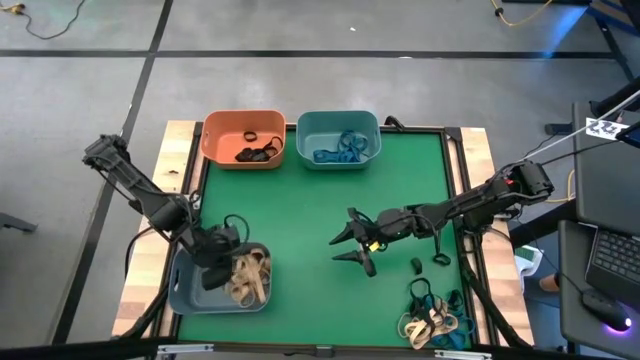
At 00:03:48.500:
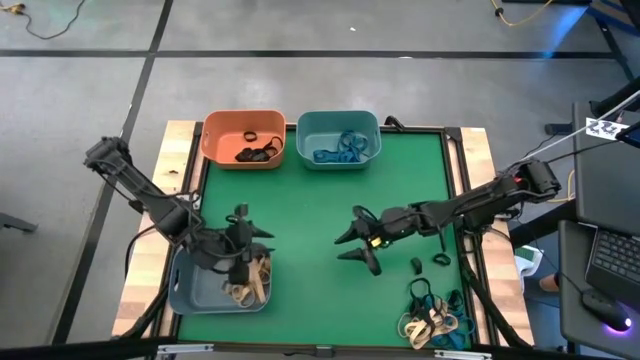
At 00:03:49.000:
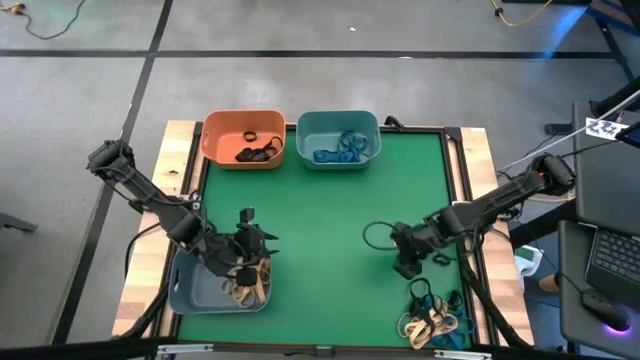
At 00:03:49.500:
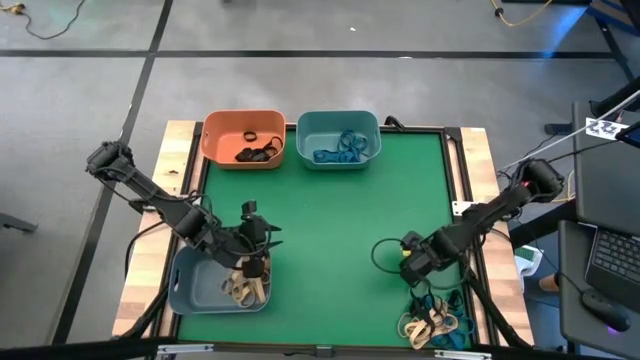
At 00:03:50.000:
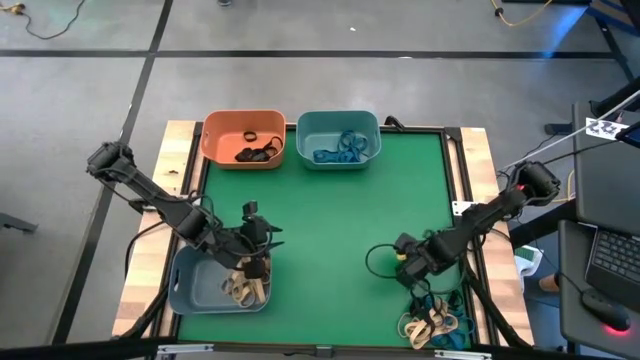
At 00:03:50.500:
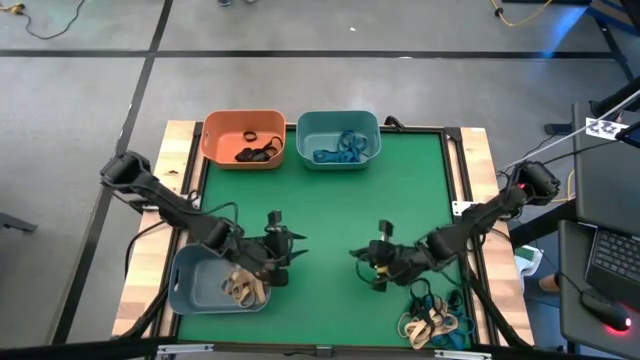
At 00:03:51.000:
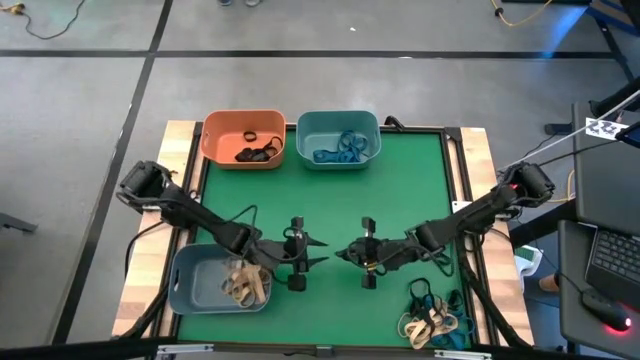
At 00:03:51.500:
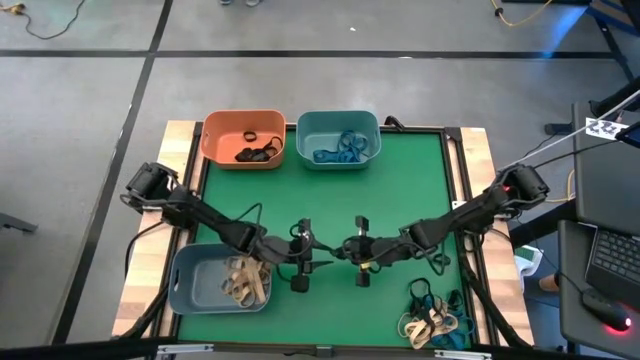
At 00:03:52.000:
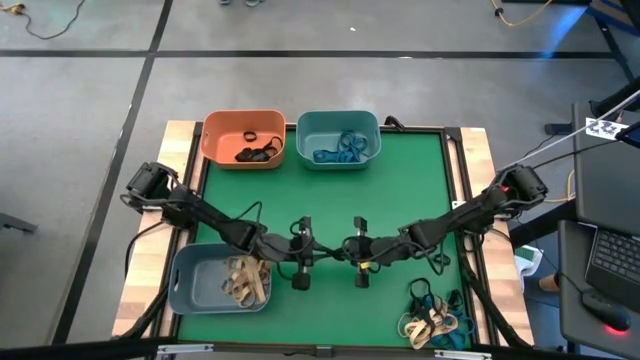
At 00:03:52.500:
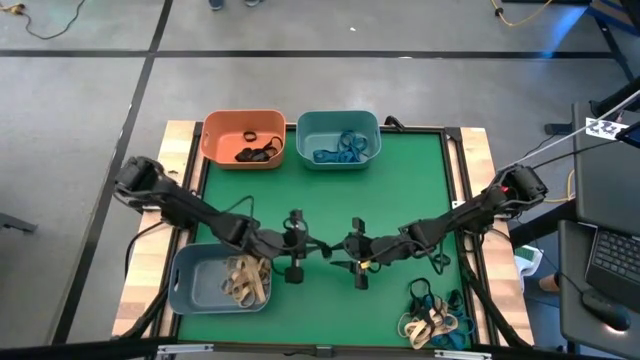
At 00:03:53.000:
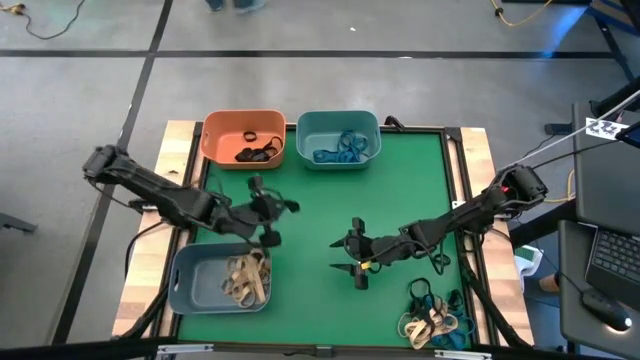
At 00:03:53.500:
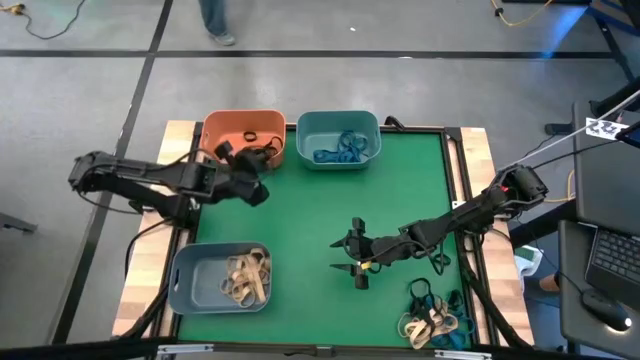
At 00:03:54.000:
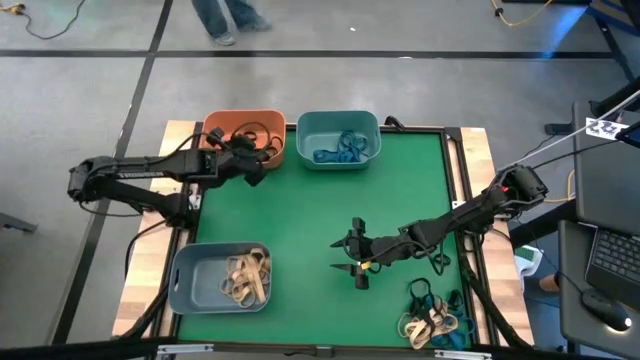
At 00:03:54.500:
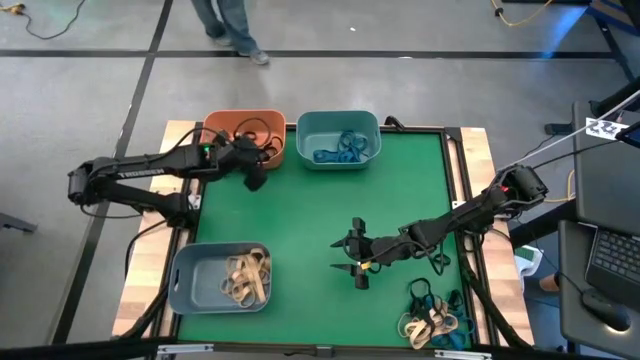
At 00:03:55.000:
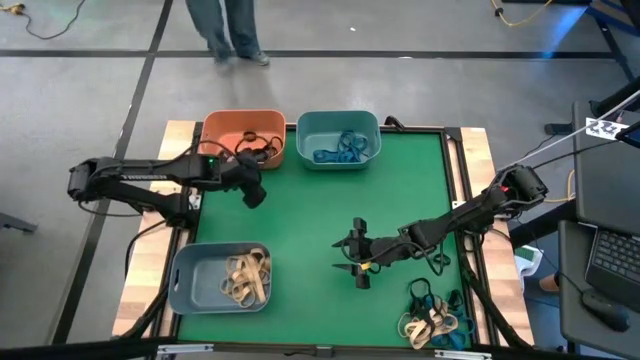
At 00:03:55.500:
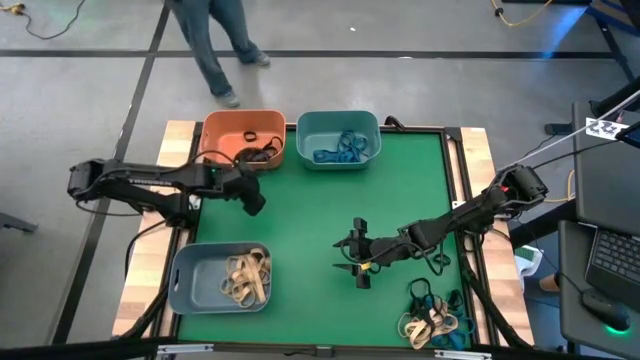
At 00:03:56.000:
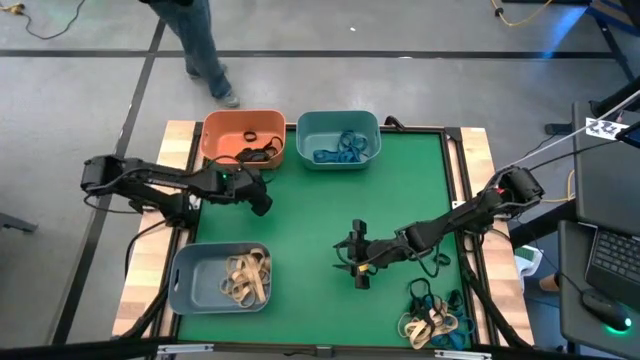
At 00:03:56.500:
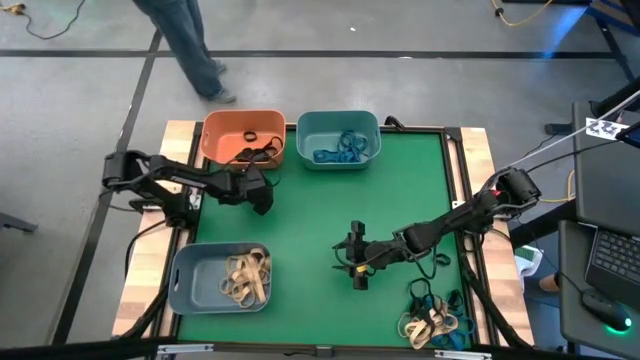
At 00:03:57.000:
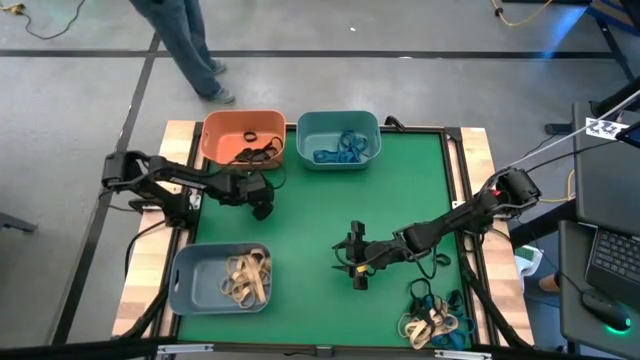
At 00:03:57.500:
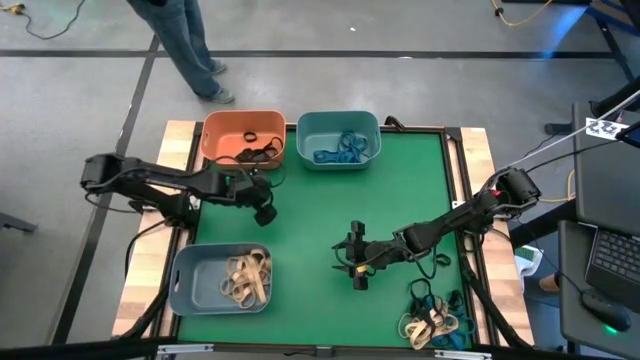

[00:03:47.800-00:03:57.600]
Task: Sort rubber bands into baskets
Put the small black rubber band into the orange bin

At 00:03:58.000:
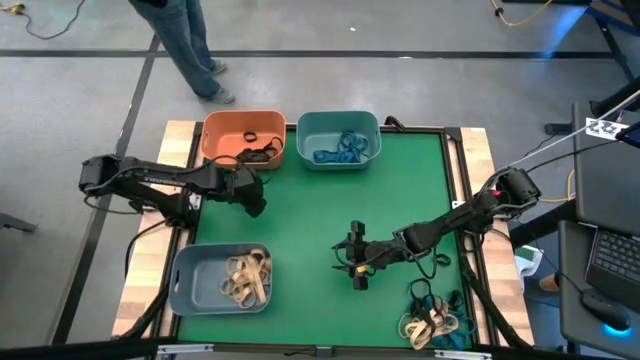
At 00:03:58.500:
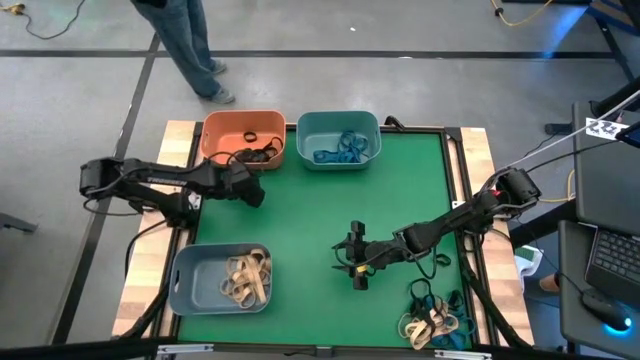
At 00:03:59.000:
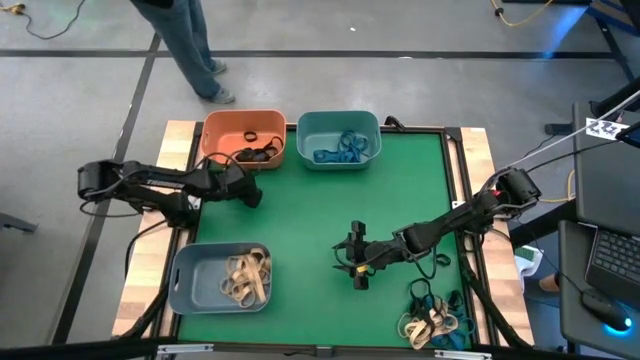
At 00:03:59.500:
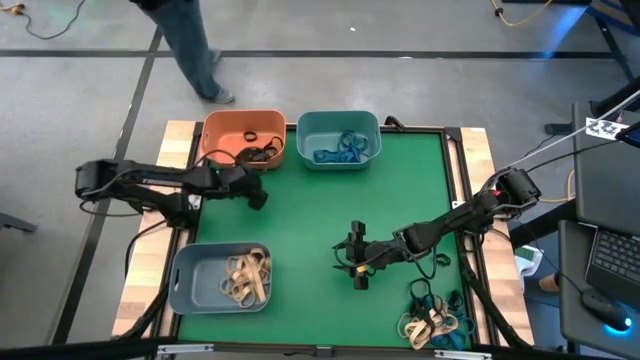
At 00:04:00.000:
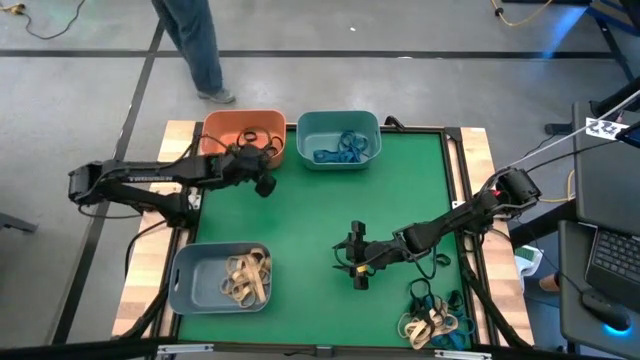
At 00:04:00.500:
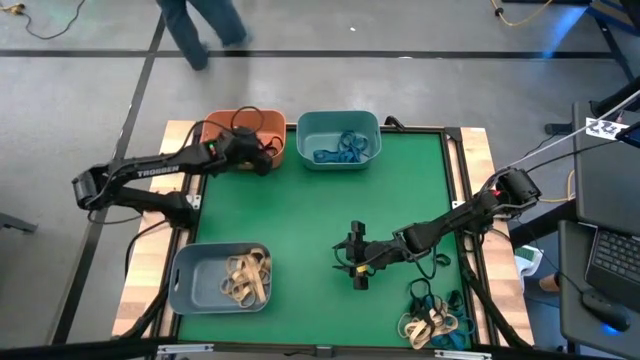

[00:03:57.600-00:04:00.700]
Put the black rubber band into the orange bin

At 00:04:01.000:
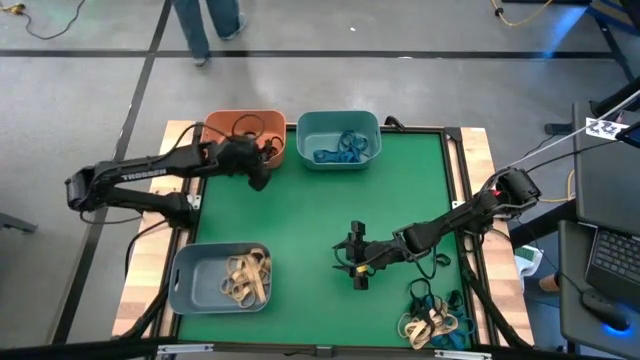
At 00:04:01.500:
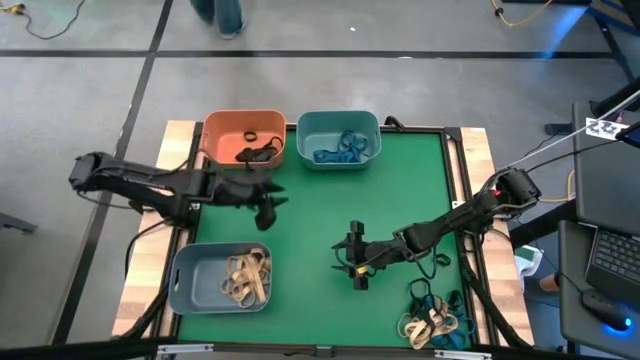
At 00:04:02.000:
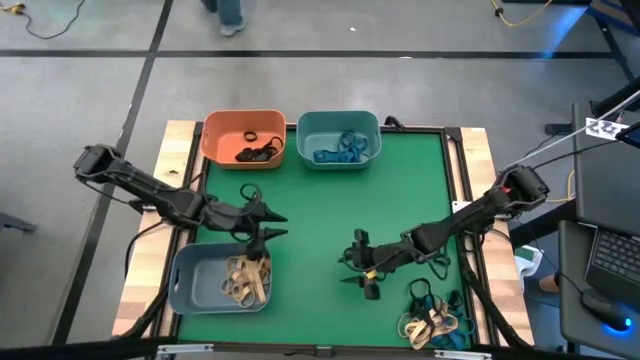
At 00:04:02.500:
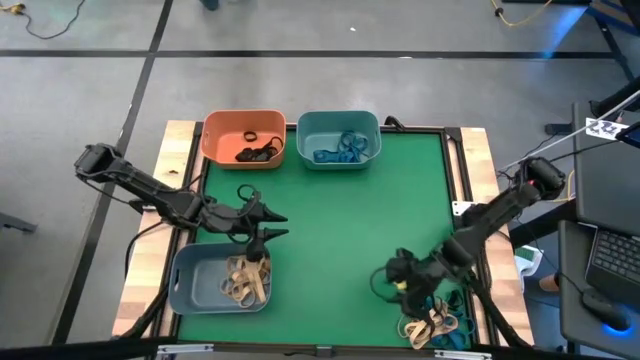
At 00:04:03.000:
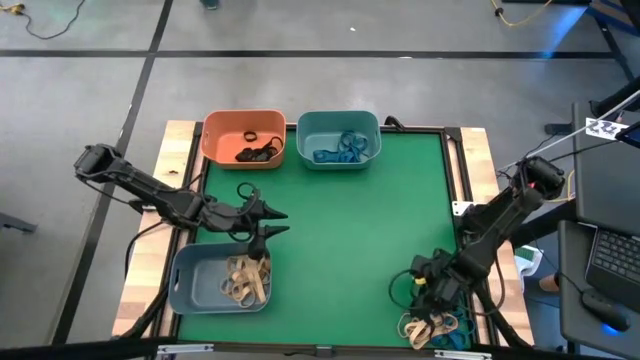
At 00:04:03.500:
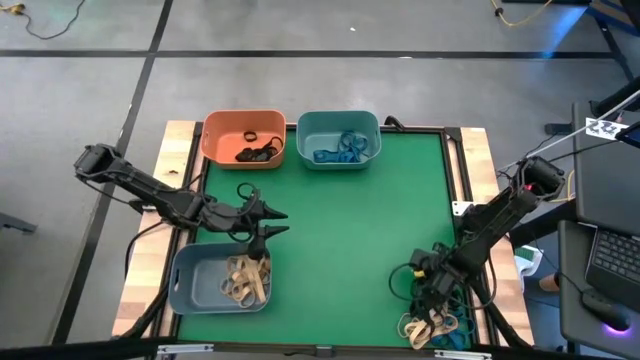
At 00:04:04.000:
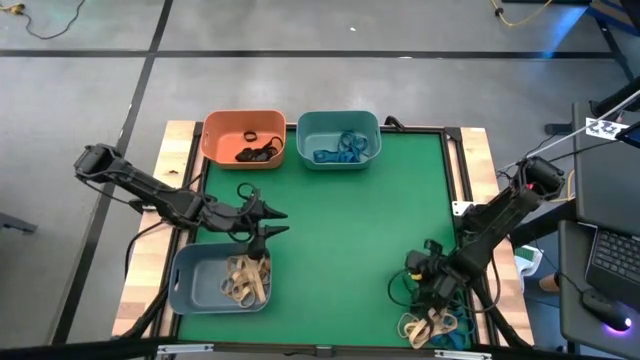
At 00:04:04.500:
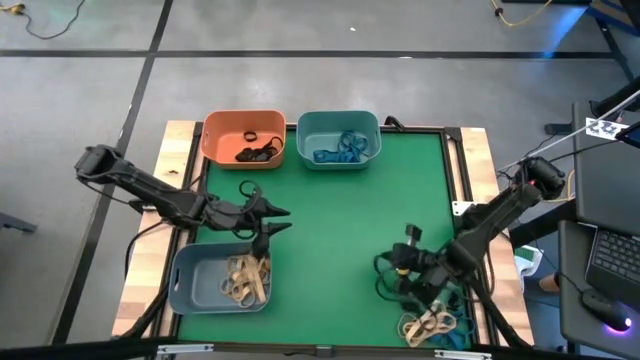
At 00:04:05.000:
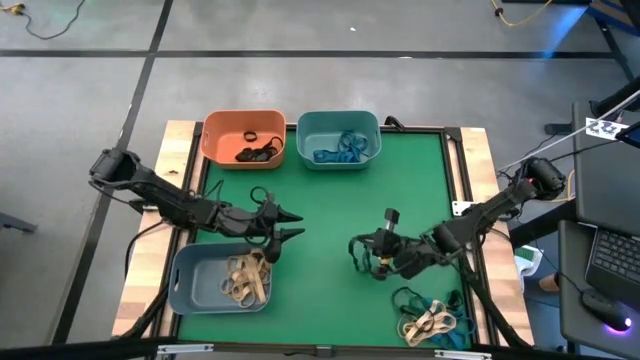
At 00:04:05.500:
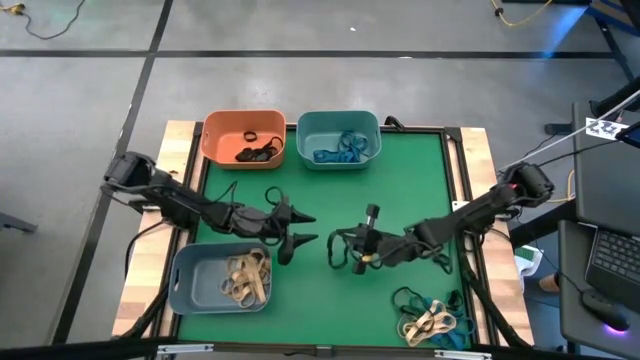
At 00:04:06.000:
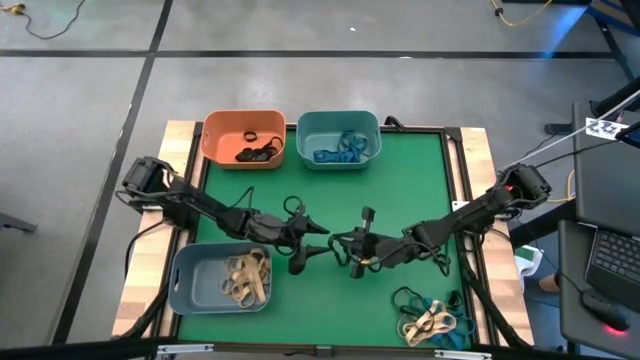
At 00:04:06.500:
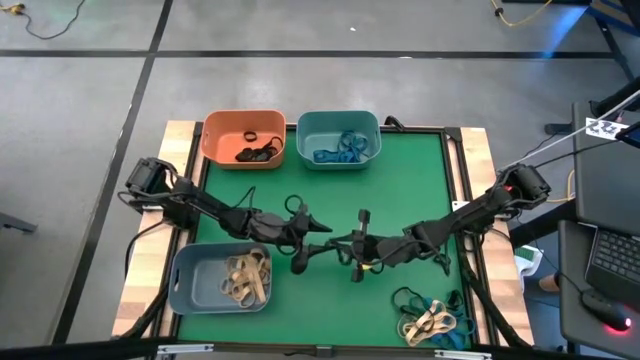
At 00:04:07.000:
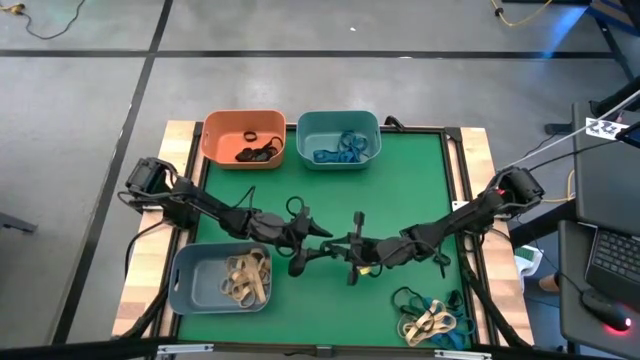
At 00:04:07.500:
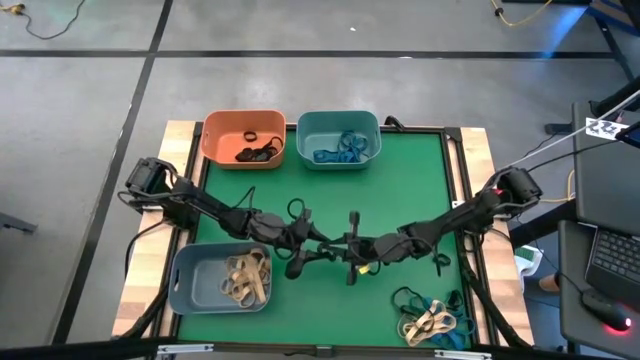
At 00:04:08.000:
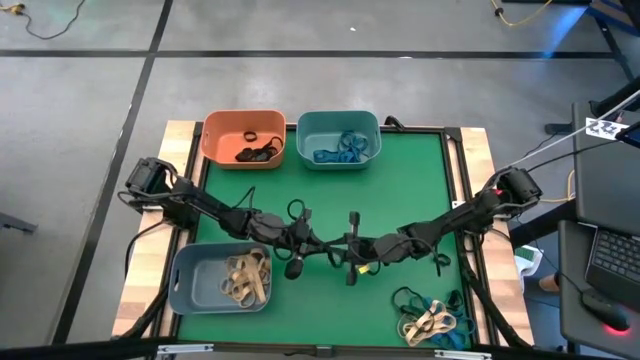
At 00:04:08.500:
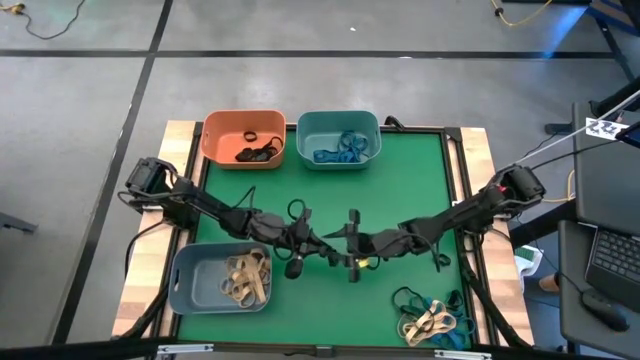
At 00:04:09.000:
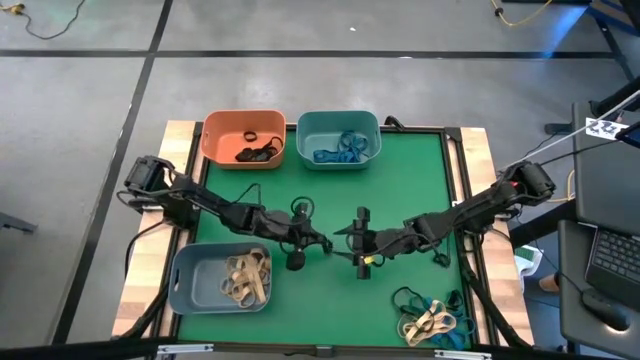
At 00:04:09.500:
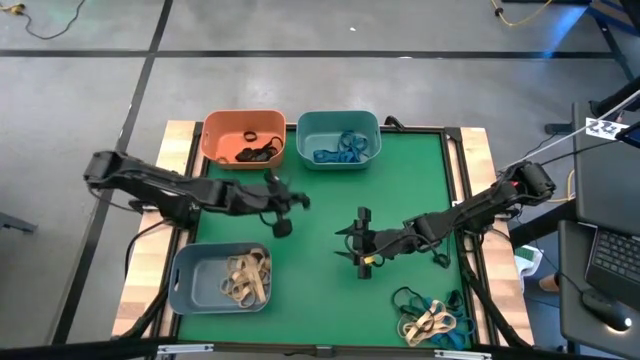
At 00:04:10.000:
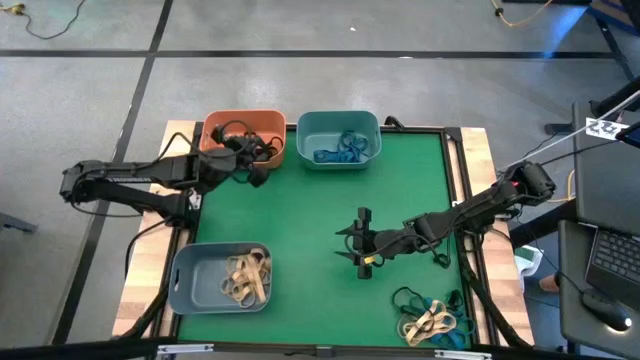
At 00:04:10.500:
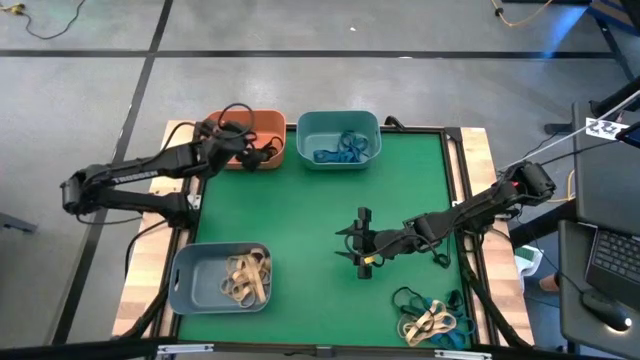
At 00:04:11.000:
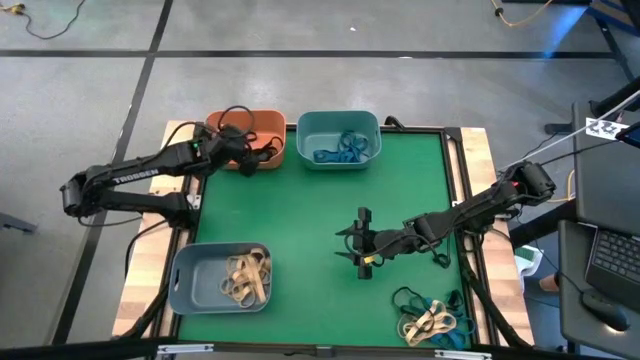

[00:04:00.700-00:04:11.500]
Put the black rubber band into the orange bin
